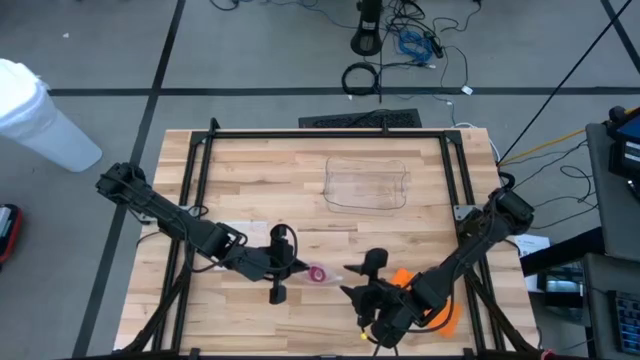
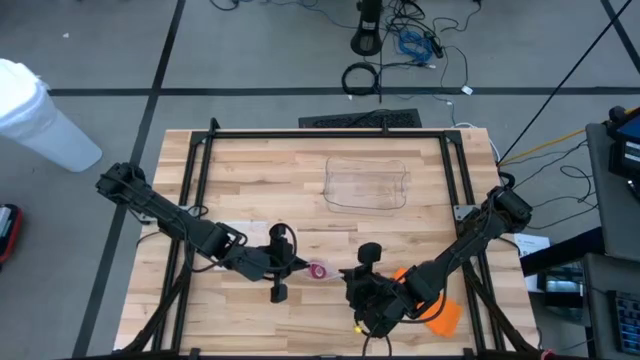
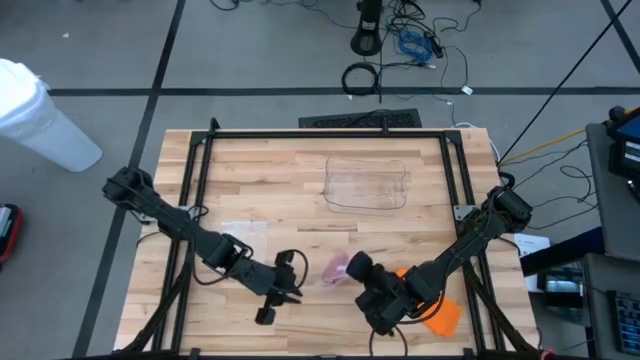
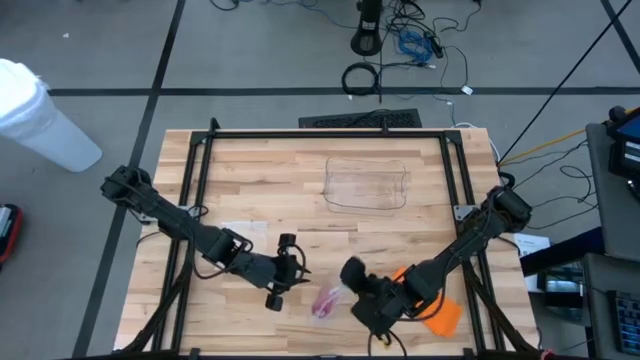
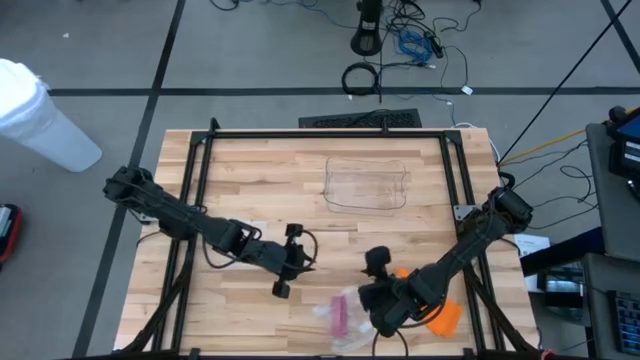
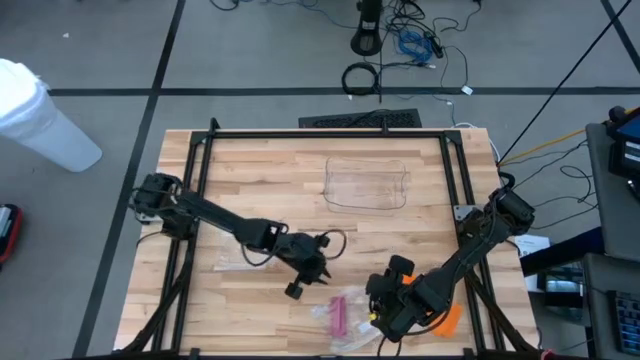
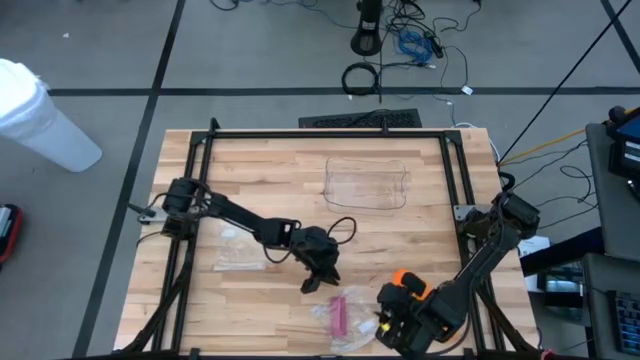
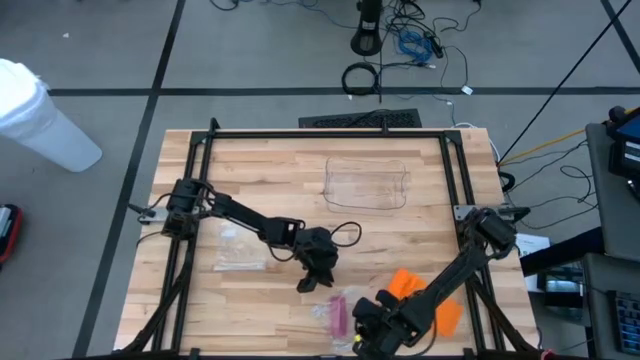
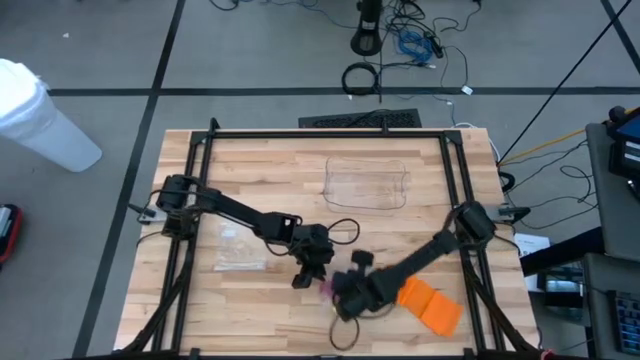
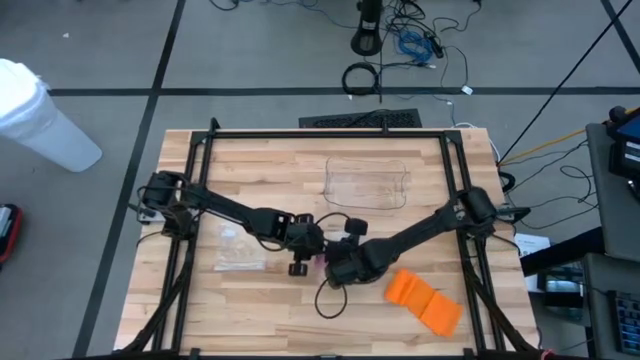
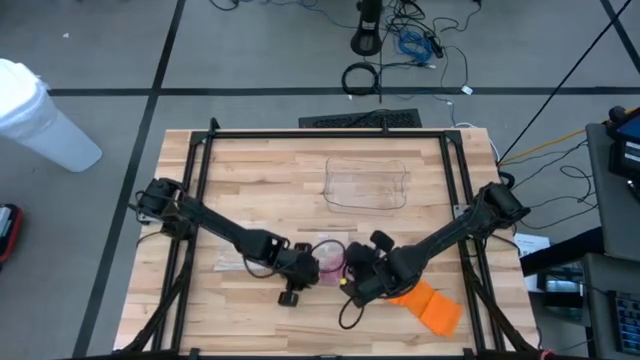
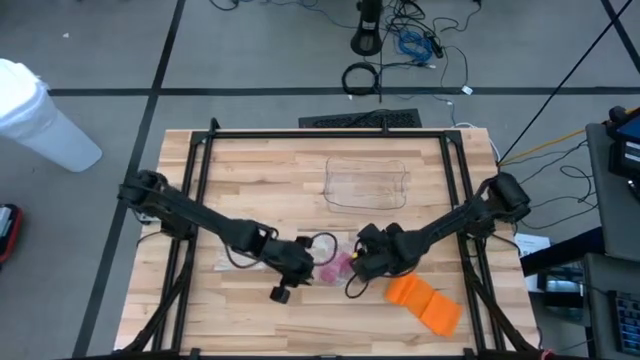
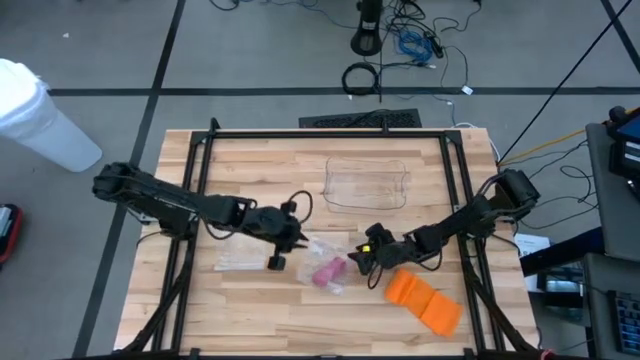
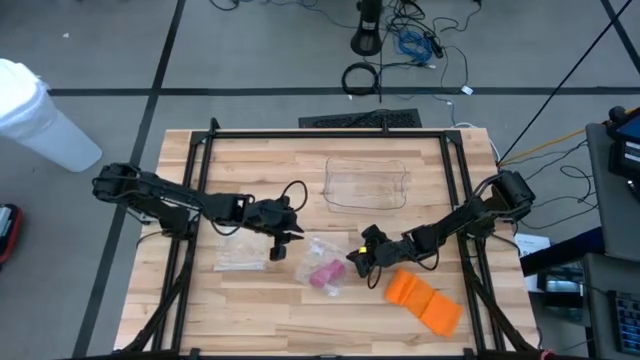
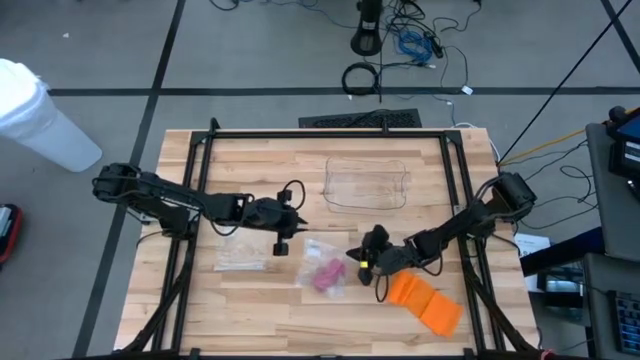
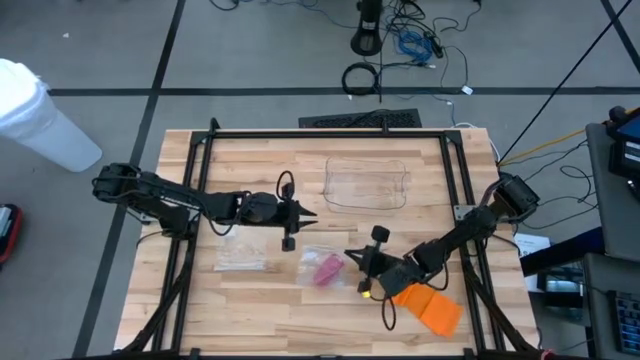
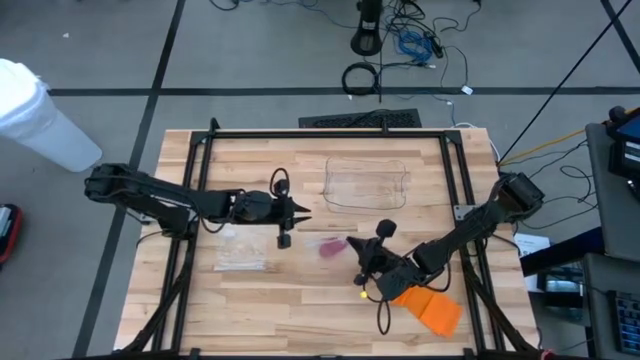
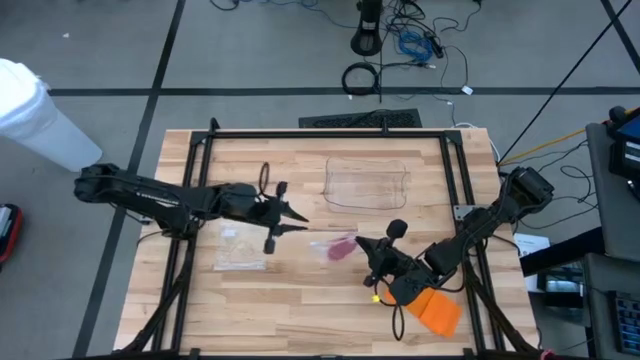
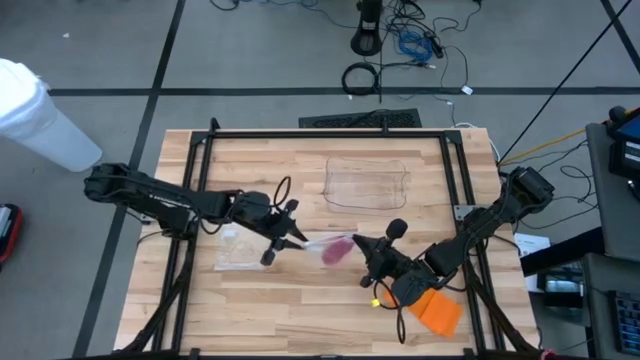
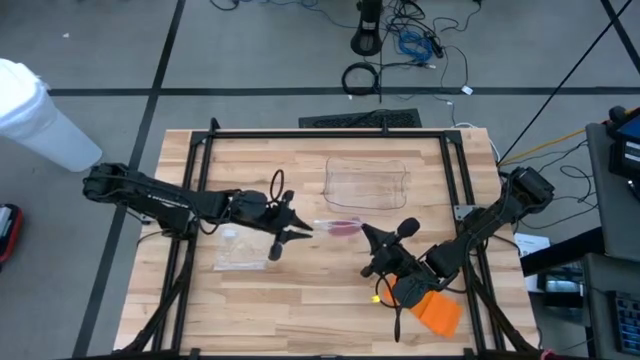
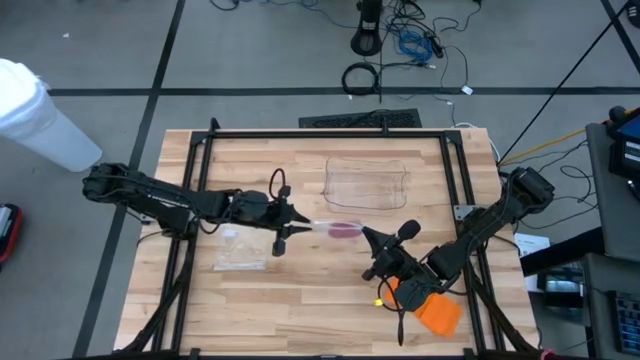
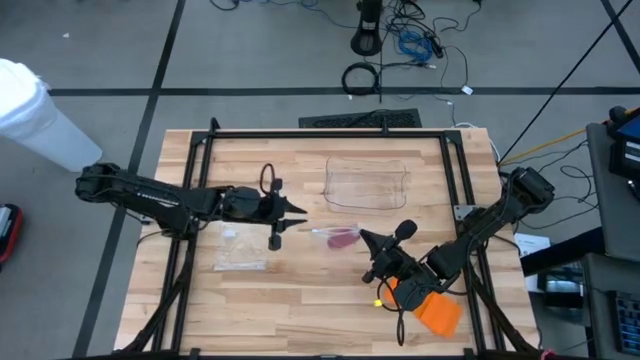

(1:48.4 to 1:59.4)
Task: Roll bandage
Close the top transparent zip bag

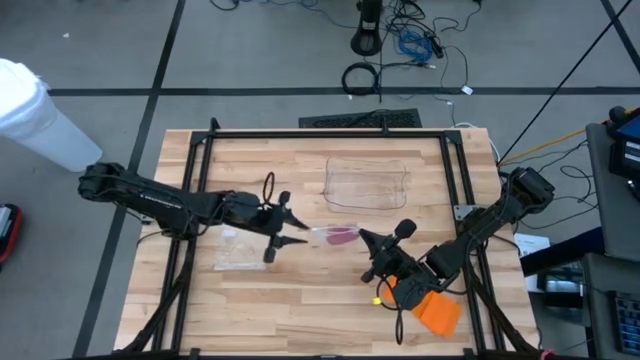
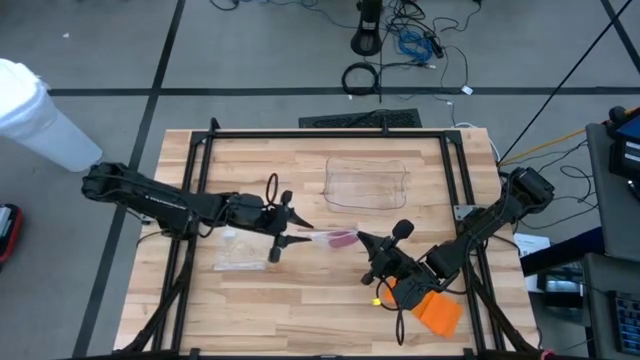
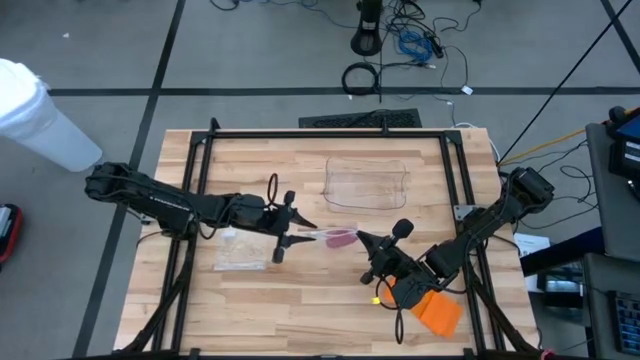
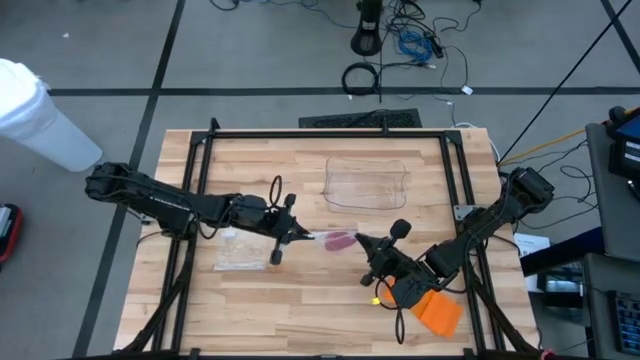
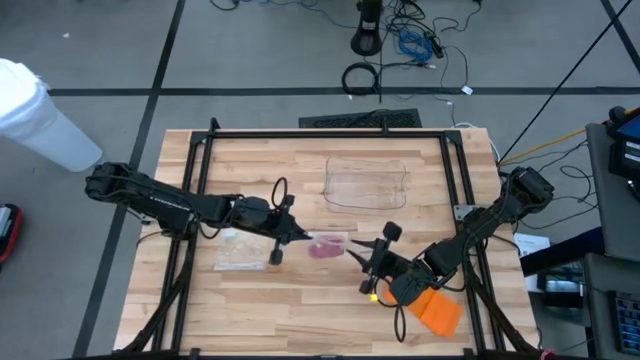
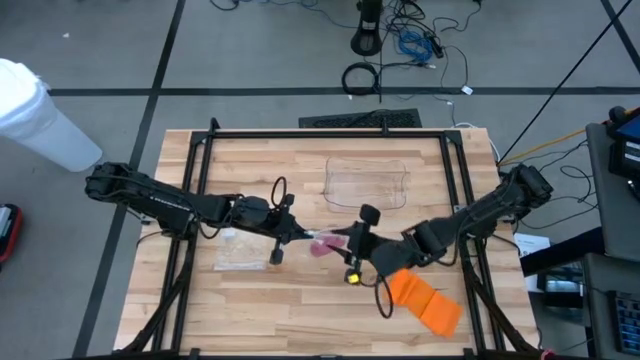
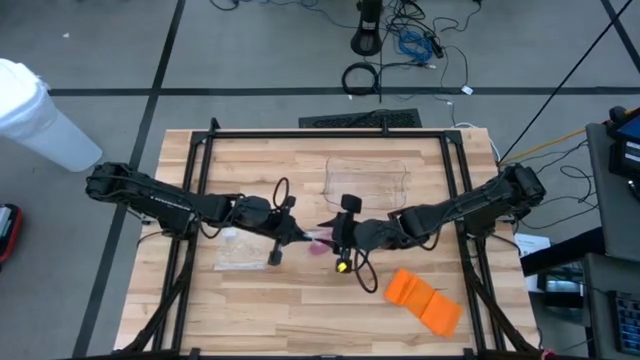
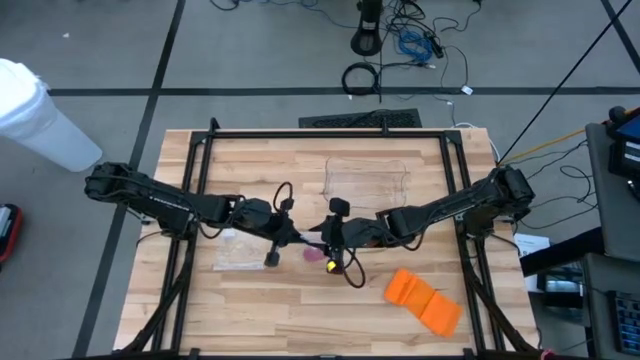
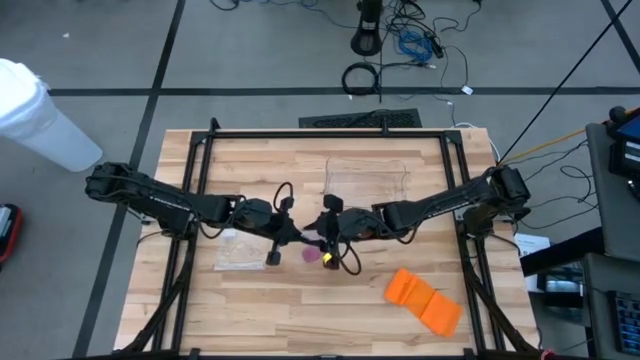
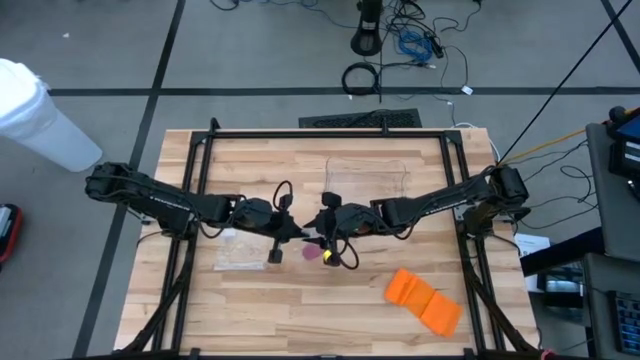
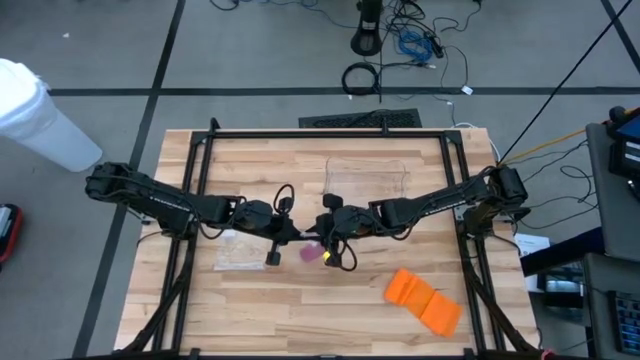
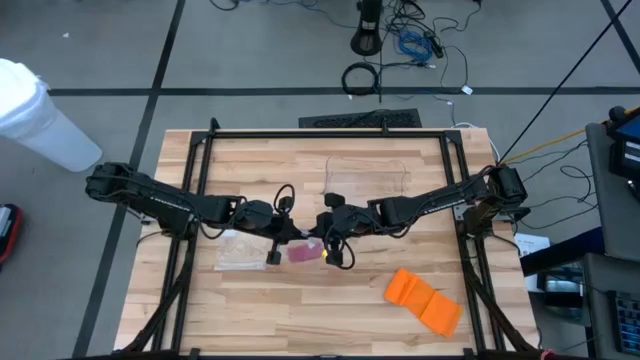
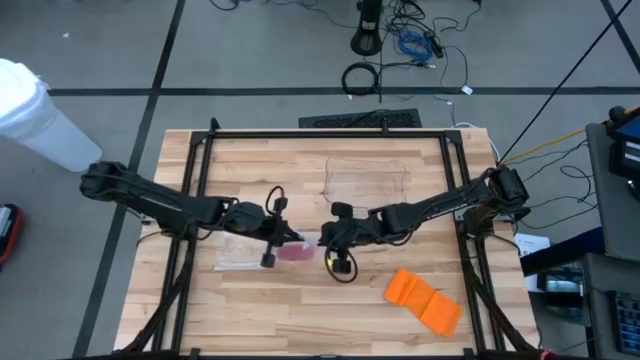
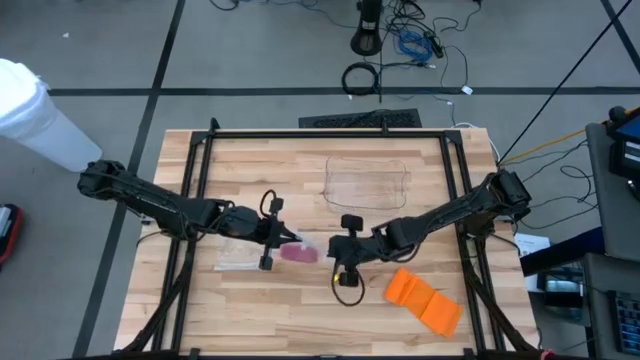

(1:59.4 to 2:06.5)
Close the top transparent zip bag

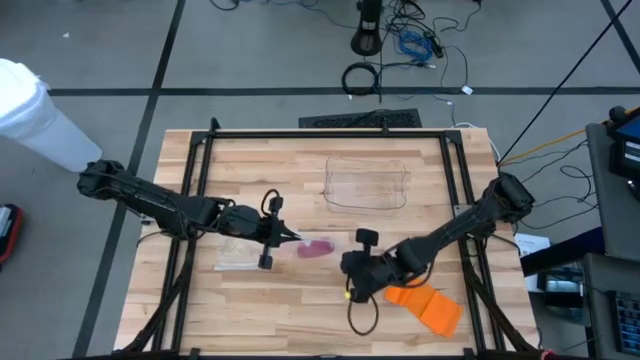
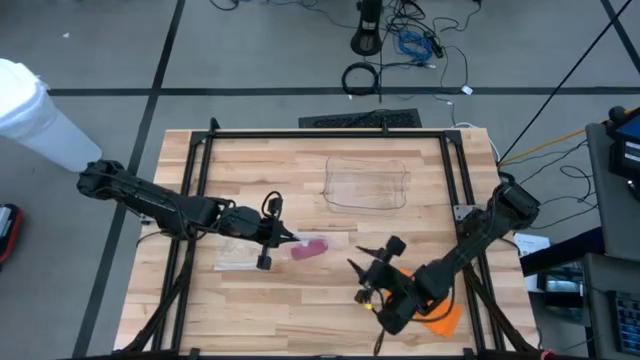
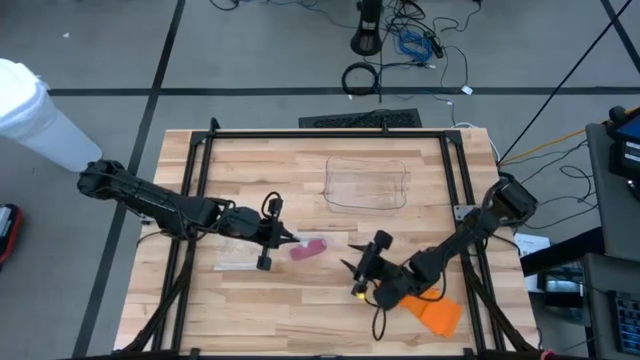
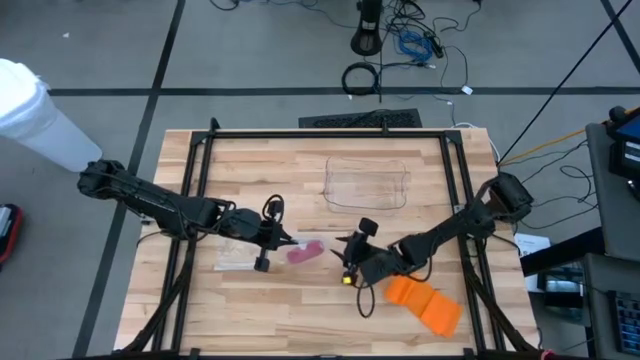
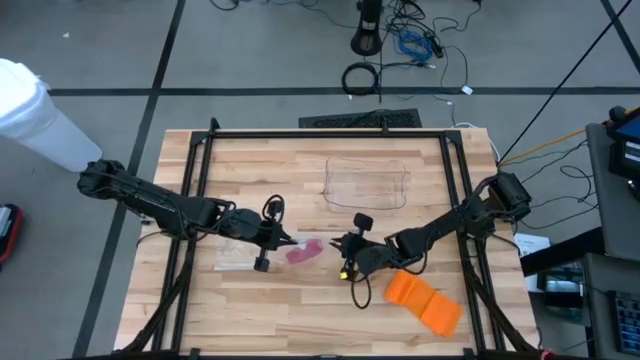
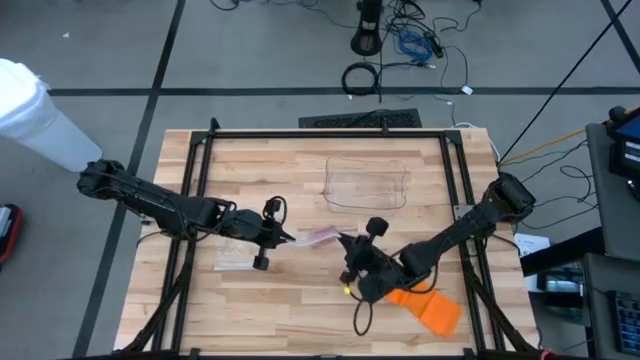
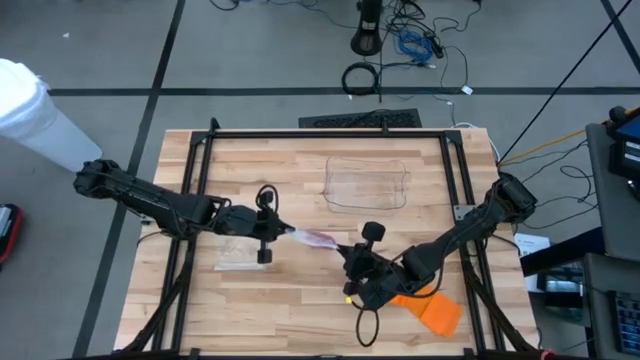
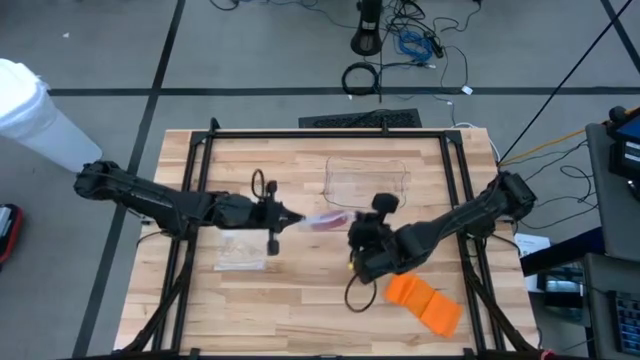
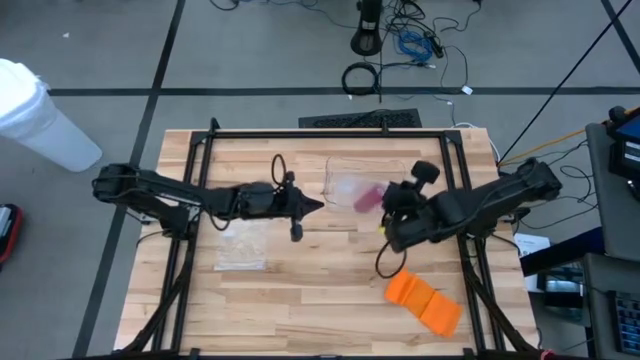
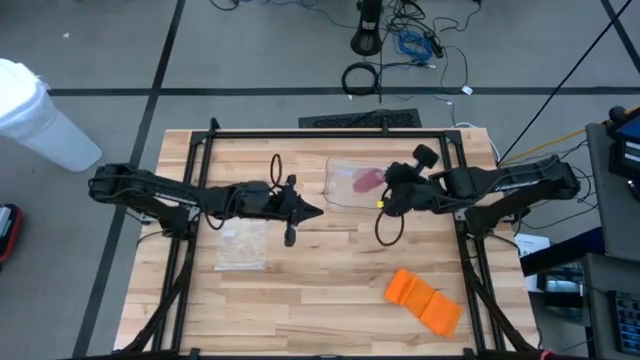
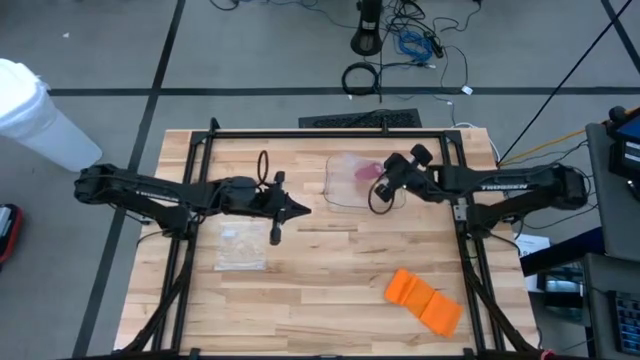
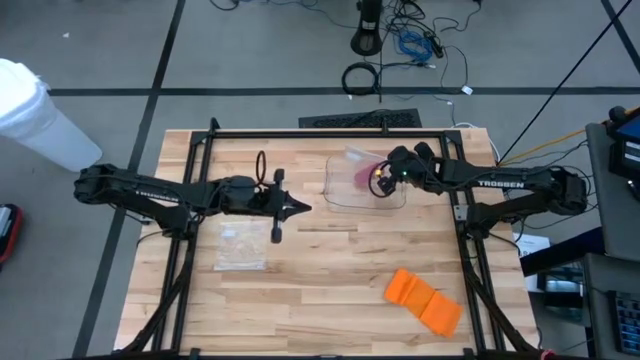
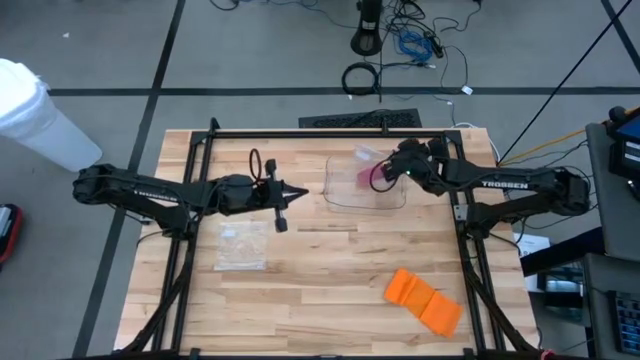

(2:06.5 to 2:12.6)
Put the top transparent zip bag with the rolled pink bandage into the transparent bin
